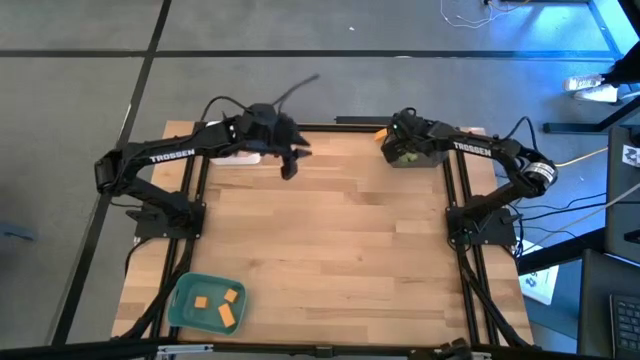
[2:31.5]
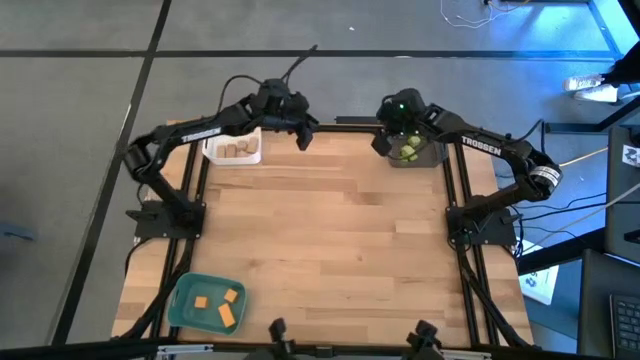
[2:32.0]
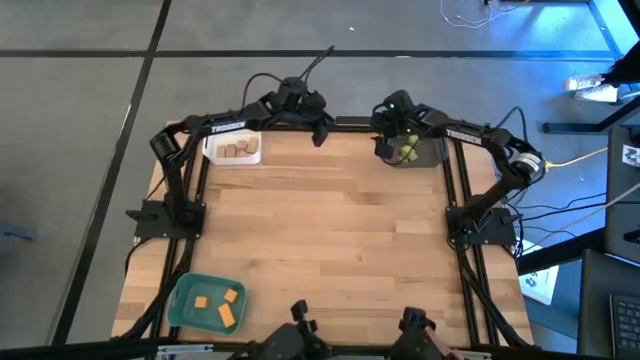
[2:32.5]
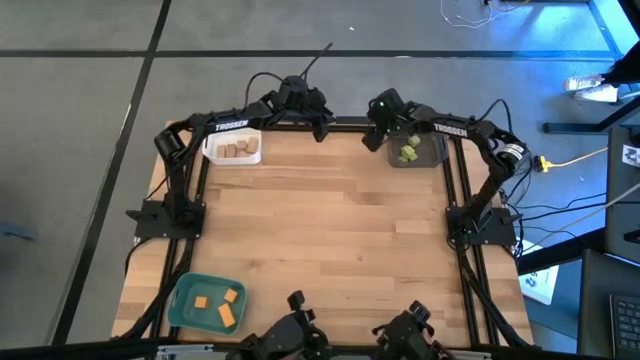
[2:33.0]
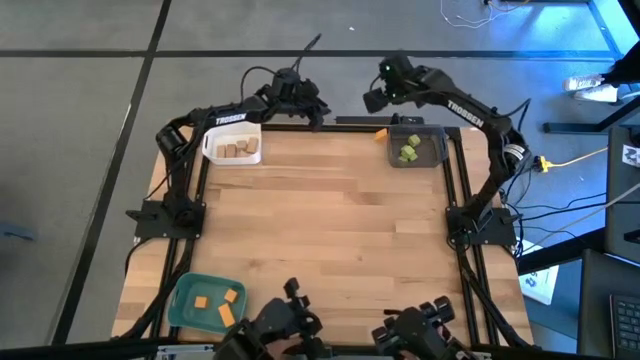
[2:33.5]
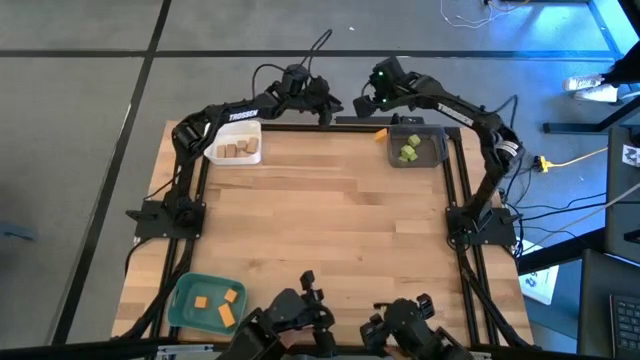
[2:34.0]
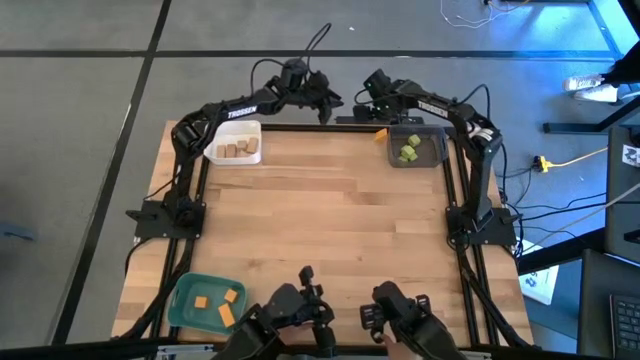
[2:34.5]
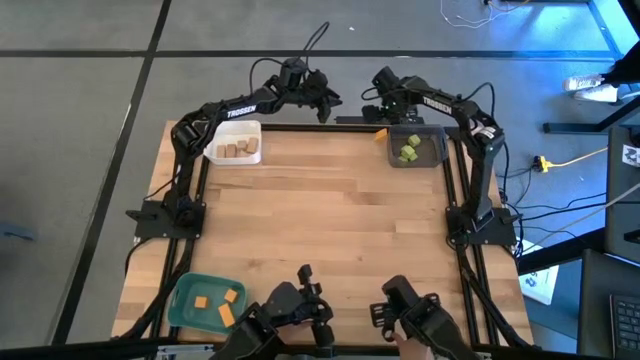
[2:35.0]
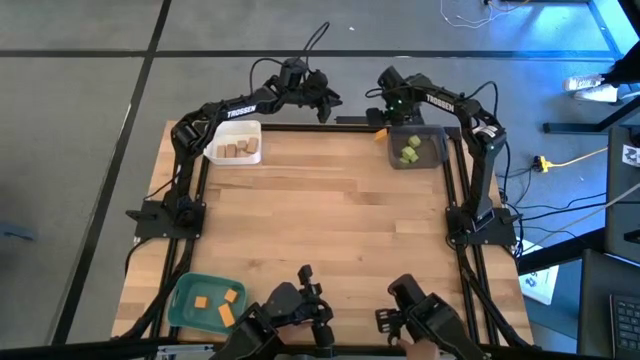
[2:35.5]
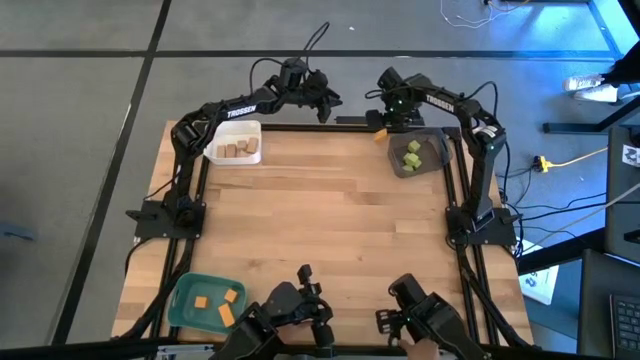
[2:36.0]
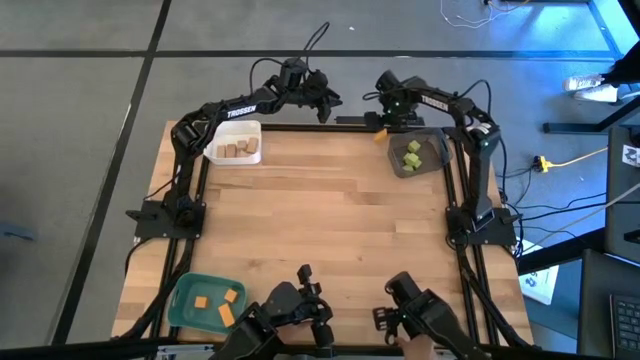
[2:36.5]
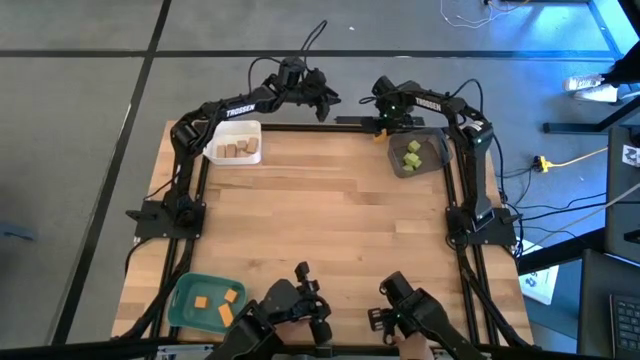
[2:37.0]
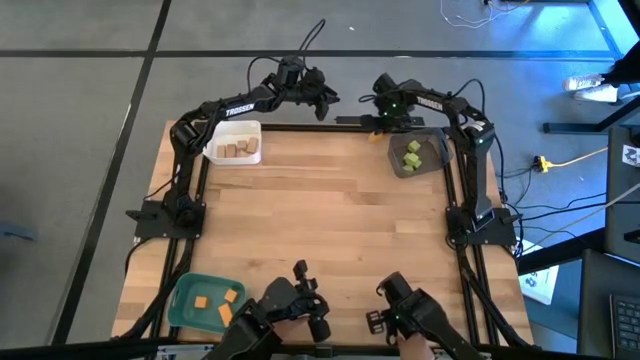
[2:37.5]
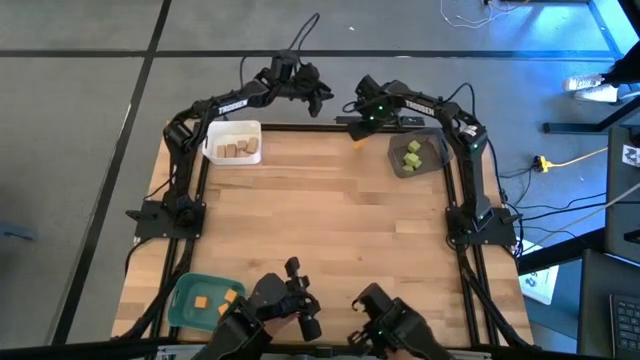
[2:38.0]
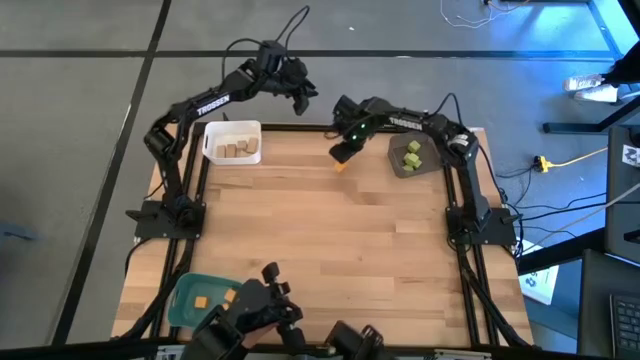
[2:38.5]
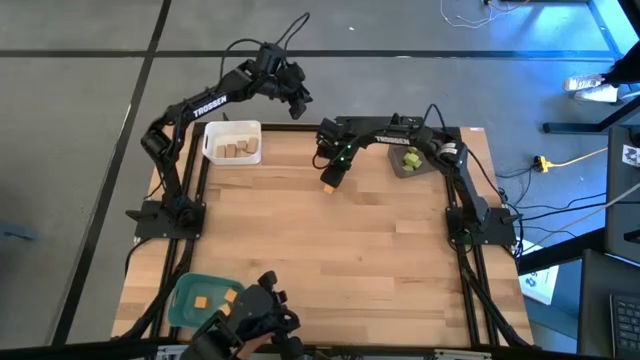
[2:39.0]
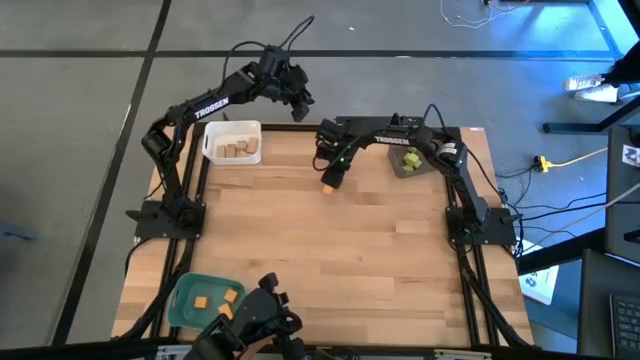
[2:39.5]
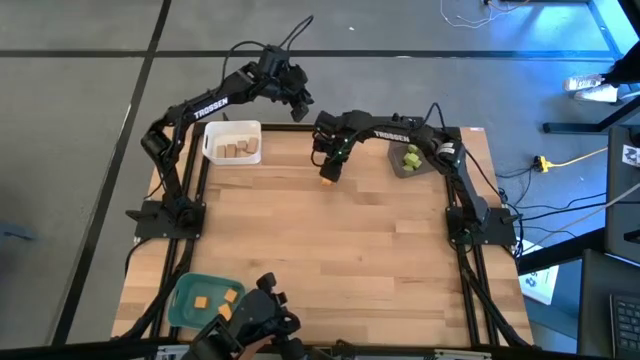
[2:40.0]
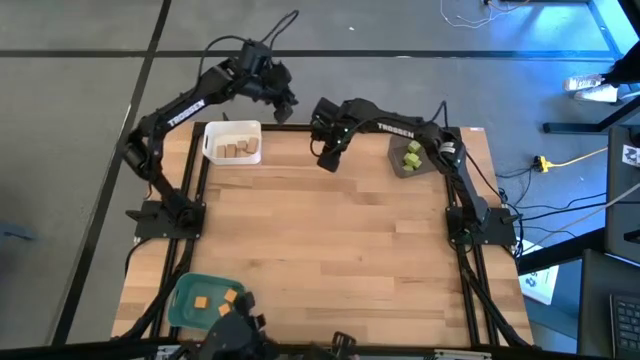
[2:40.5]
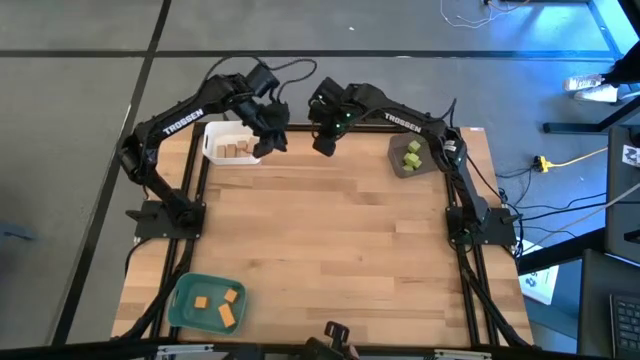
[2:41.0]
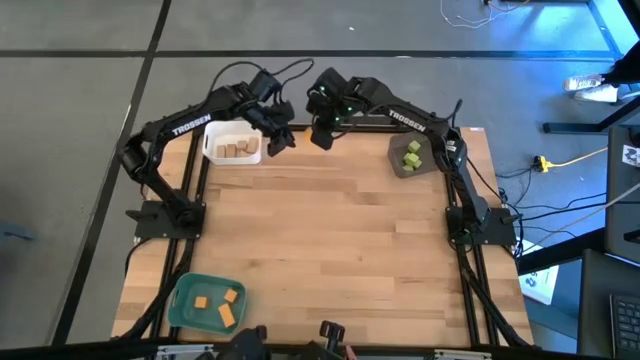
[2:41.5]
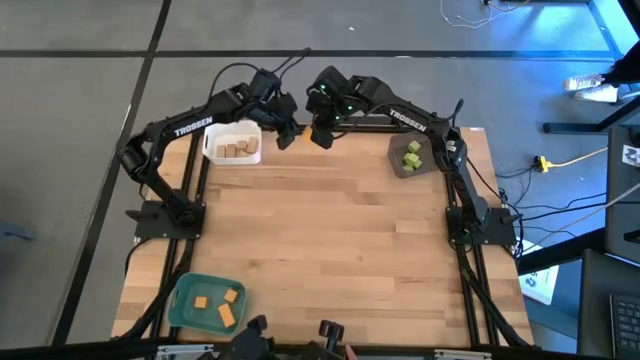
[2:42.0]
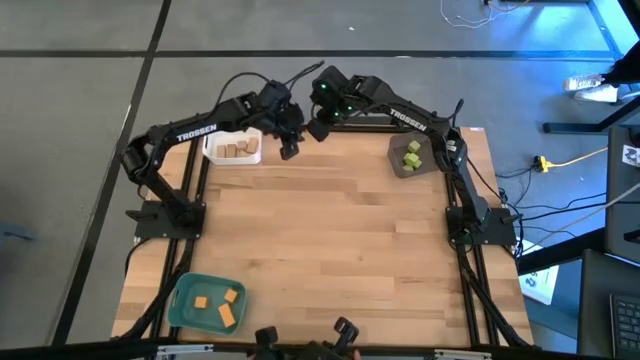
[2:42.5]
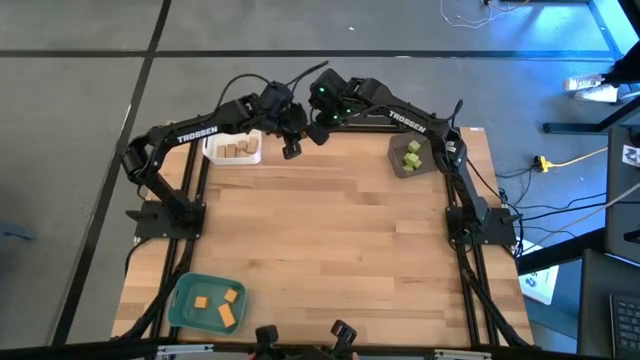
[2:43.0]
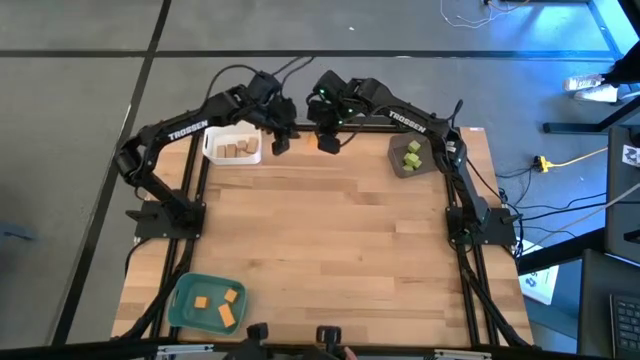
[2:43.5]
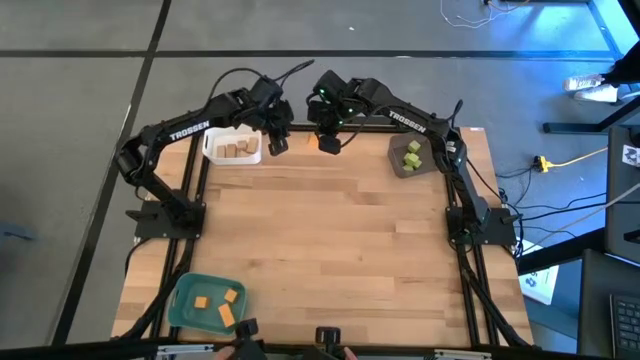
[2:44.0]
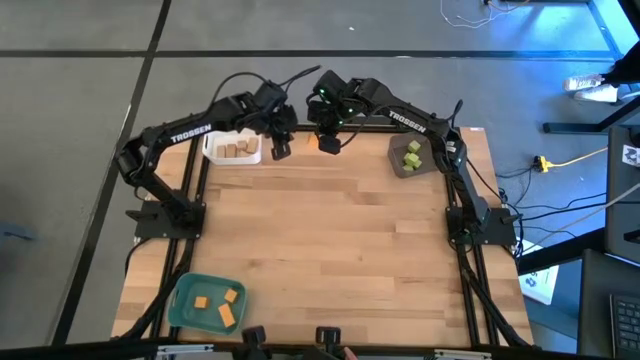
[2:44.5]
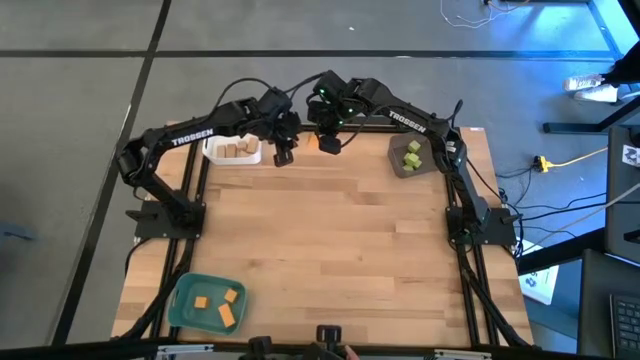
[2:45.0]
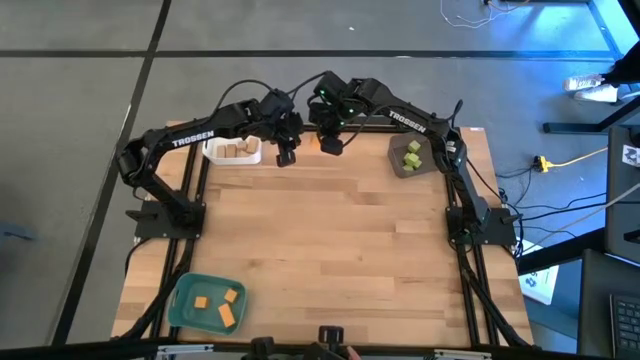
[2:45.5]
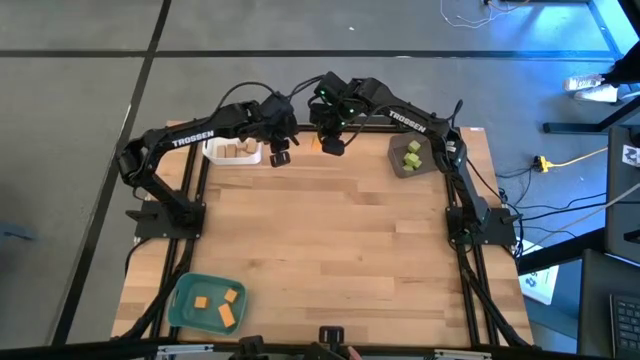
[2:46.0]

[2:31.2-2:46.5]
Task: Sort & place blocks by color
Put the orange block into the green bin

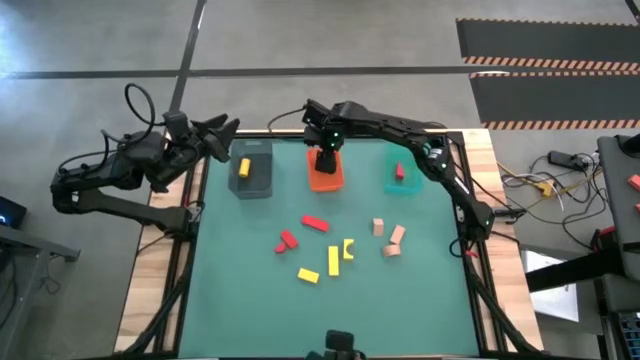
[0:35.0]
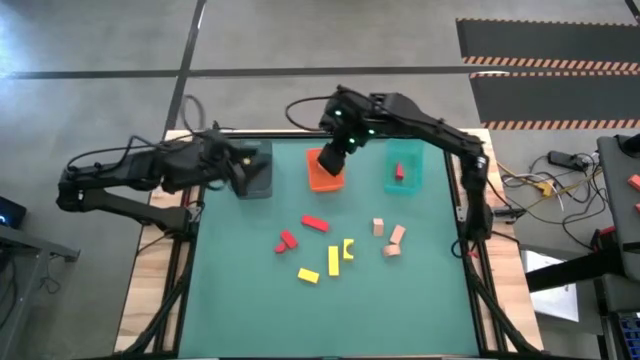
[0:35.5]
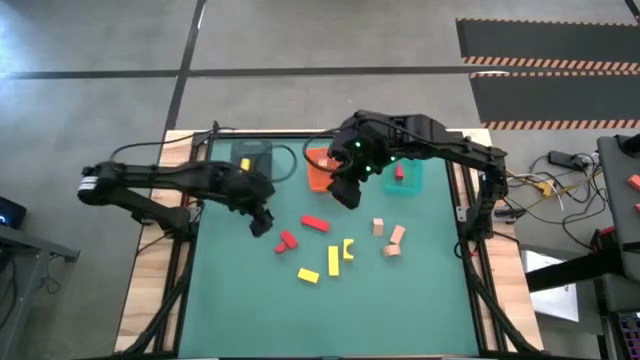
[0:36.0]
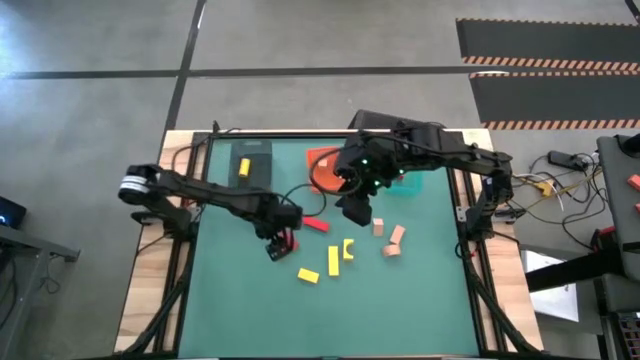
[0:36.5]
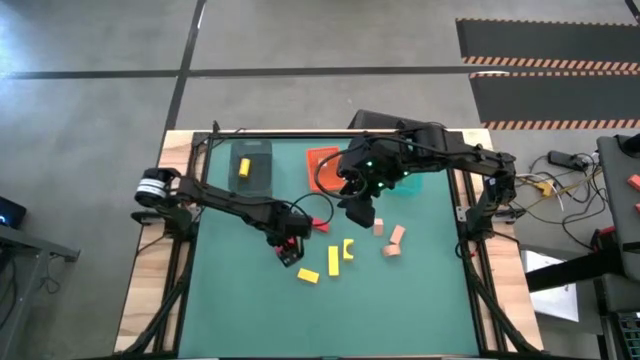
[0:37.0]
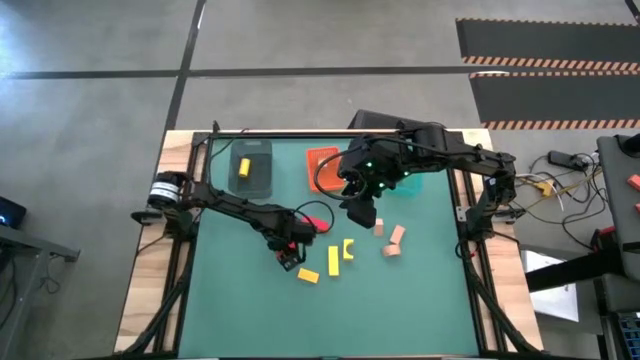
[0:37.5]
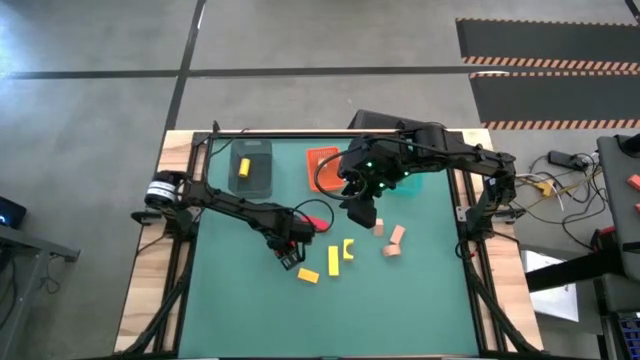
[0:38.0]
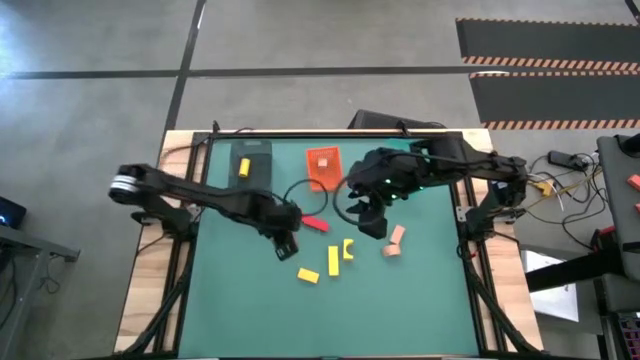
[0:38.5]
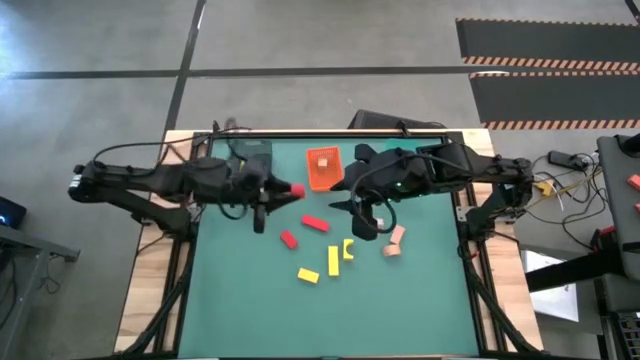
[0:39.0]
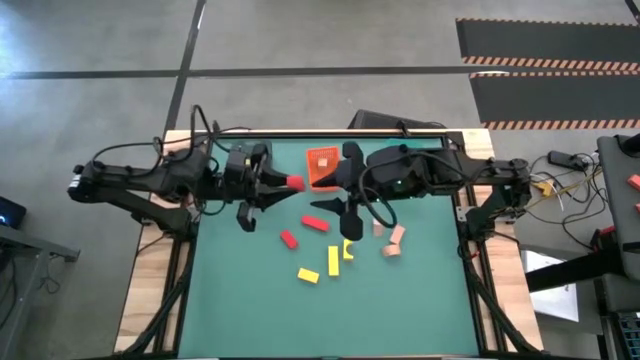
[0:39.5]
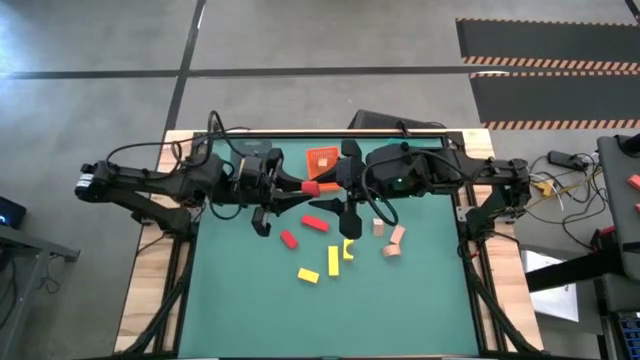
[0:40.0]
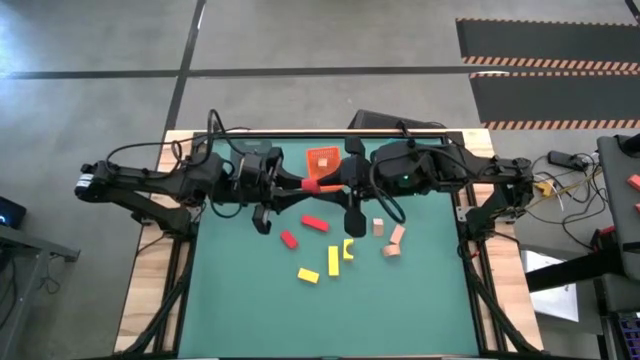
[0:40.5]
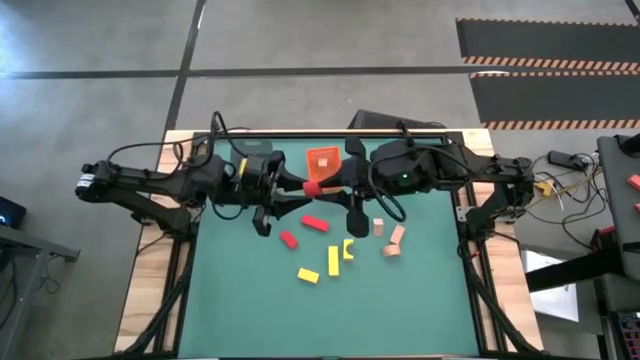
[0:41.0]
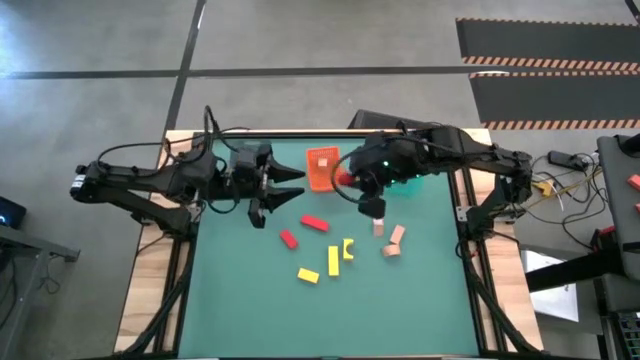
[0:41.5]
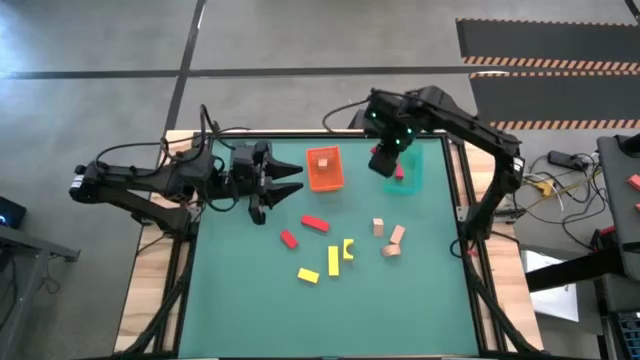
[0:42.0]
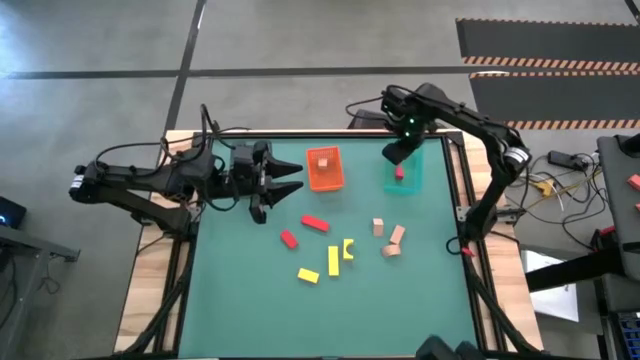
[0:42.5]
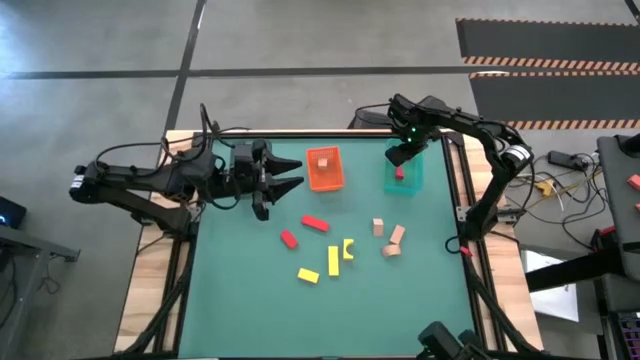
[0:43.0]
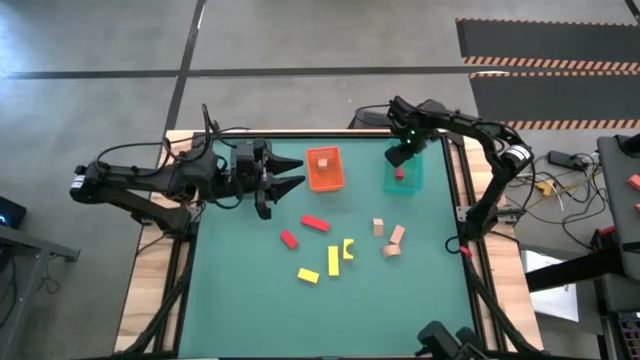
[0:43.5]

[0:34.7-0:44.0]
Task: Sort & place blocks by color
Put the red block into the green bin
